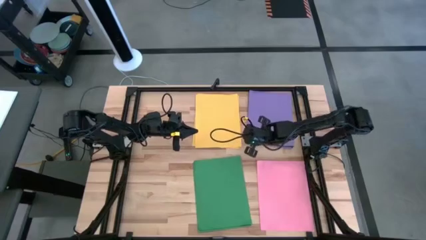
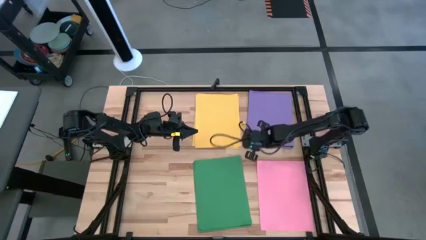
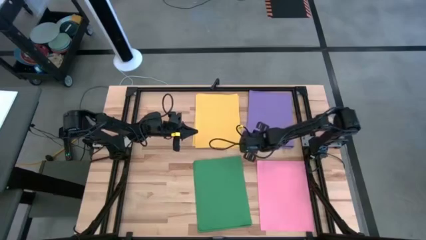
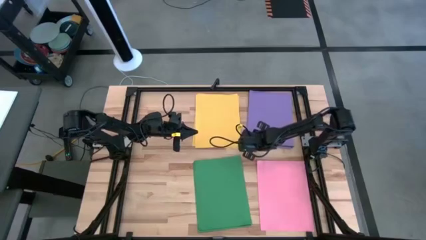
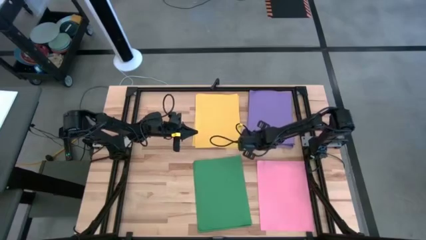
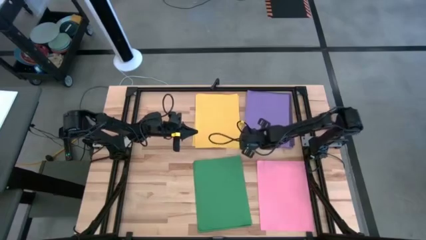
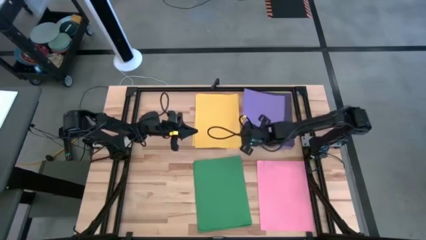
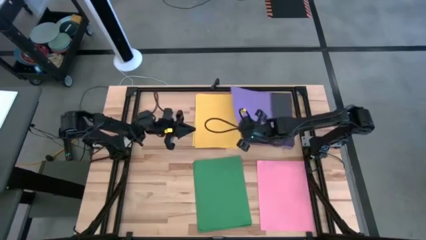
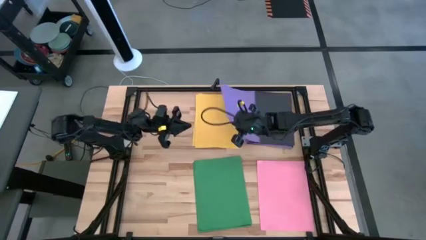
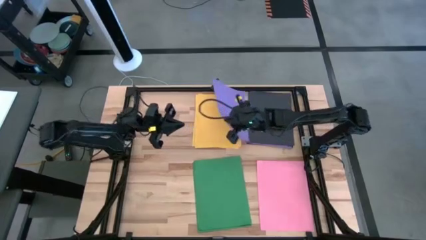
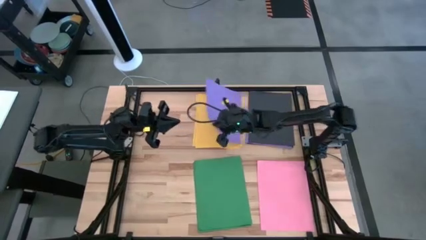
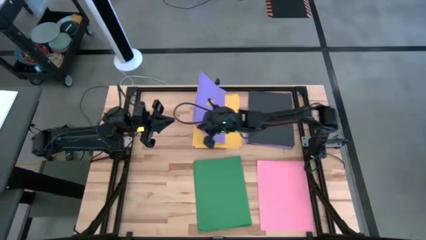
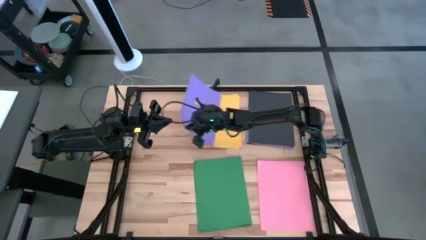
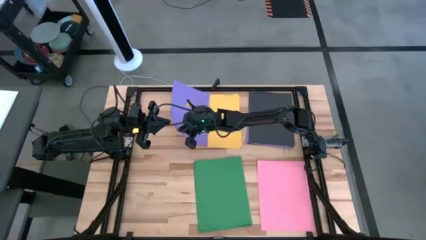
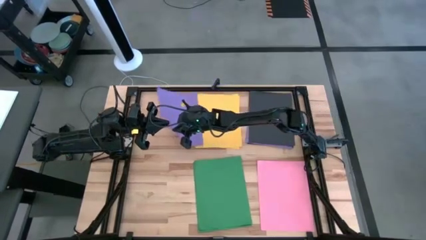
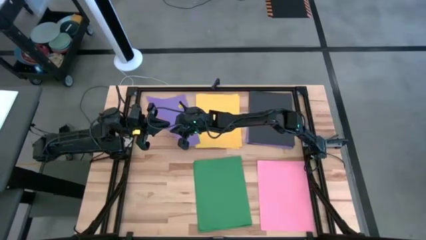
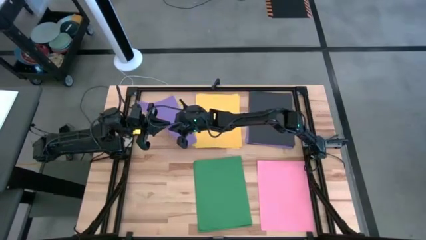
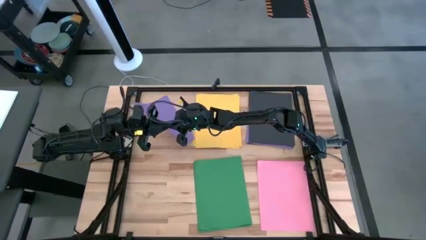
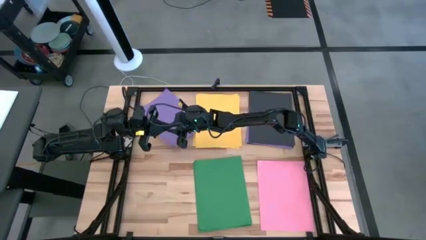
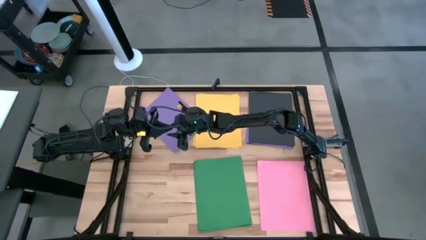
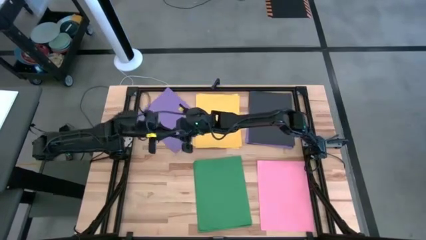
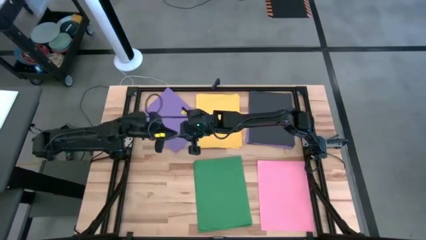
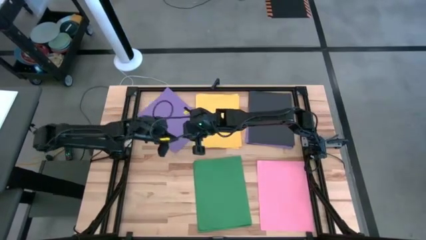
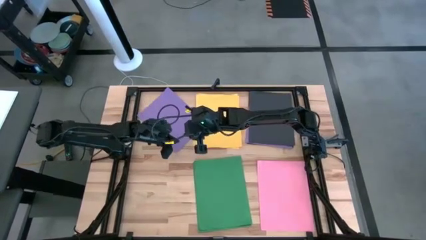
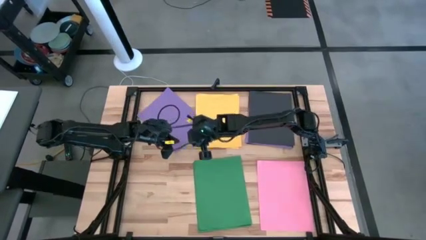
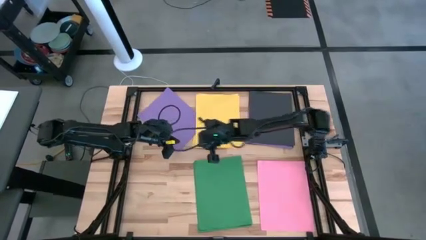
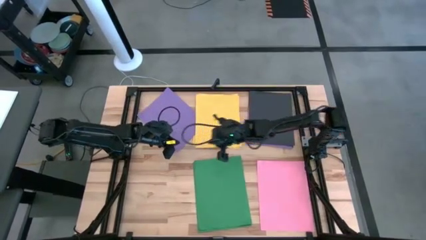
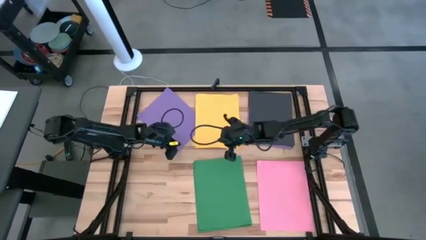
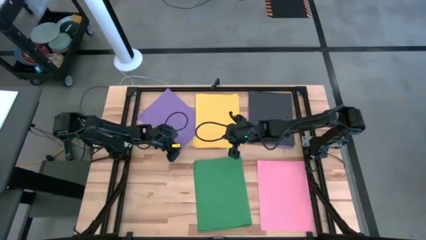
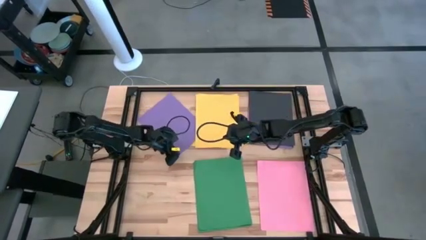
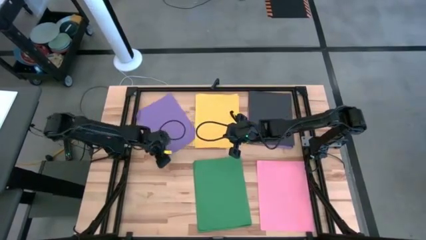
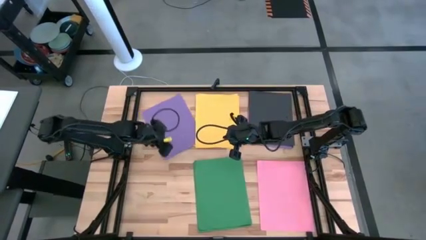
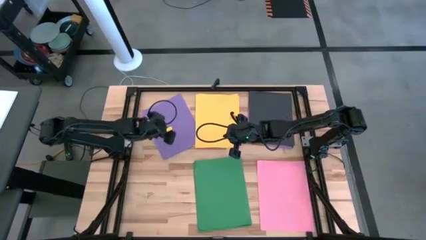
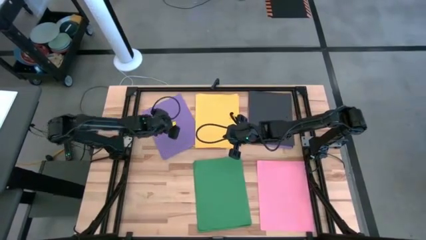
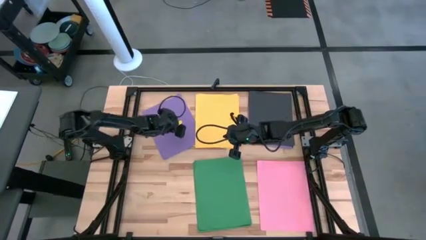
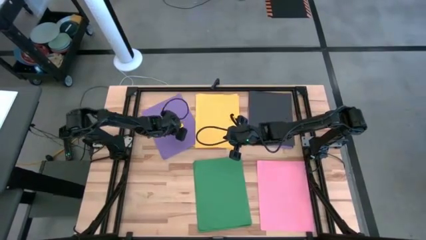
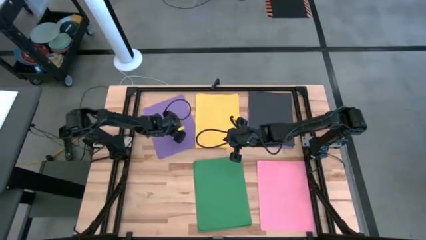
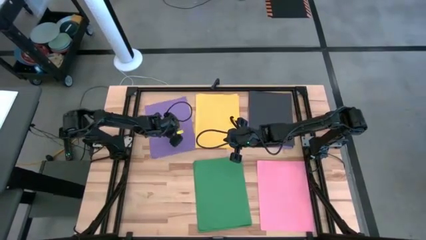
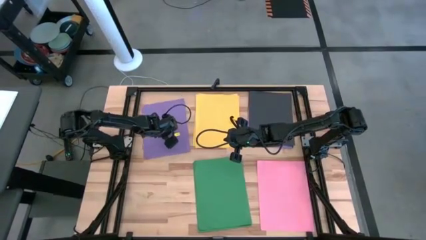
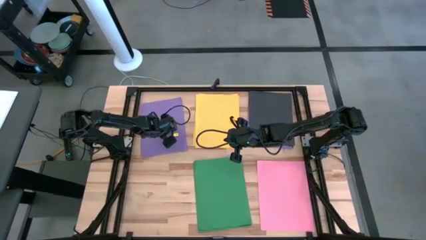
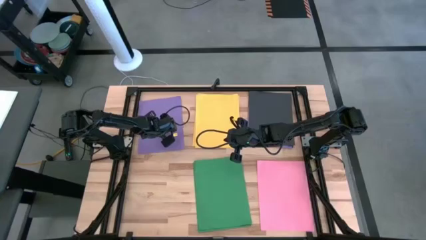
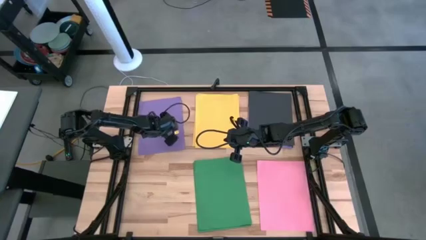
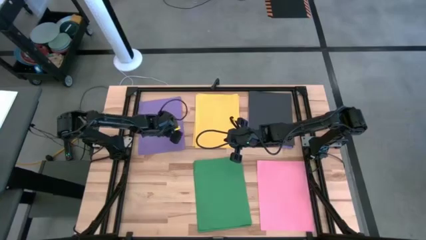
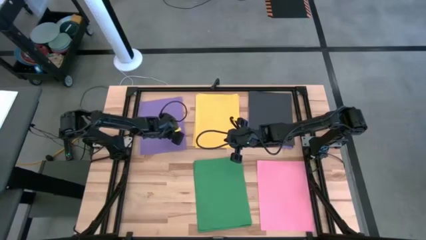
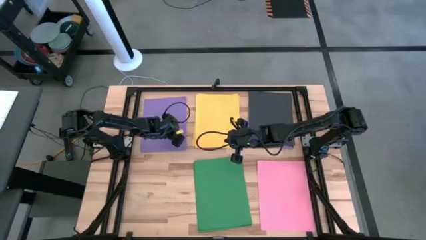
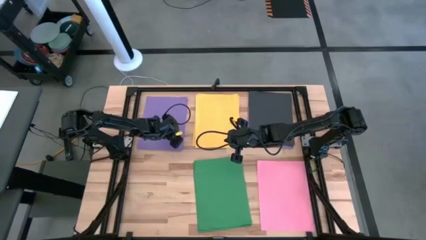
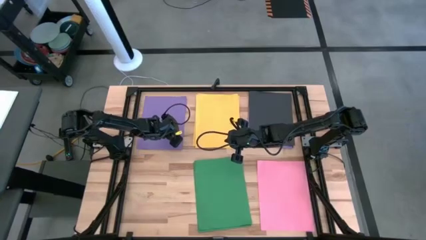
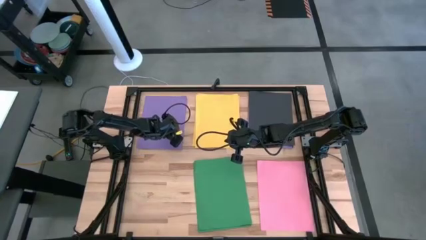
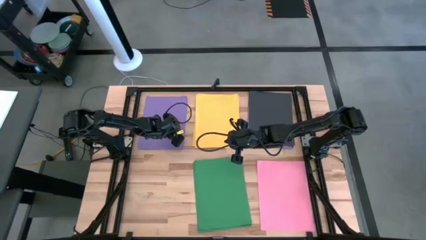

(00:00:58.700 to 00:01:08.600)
Task: Organize paper
Move the purple paper to the top left of the table

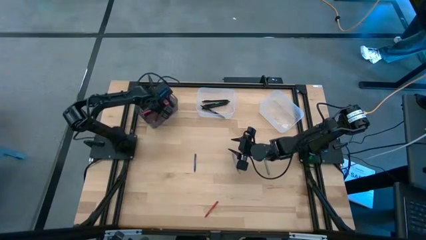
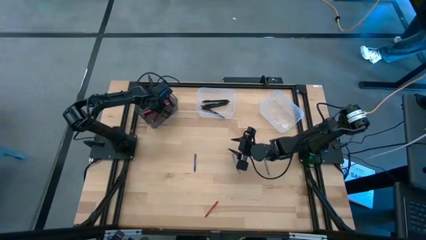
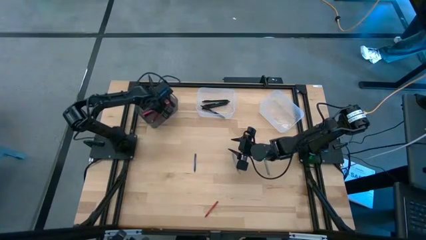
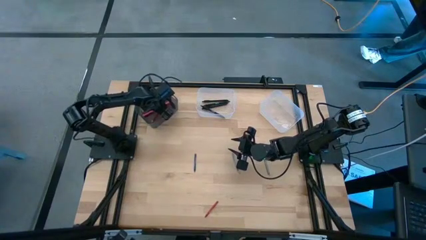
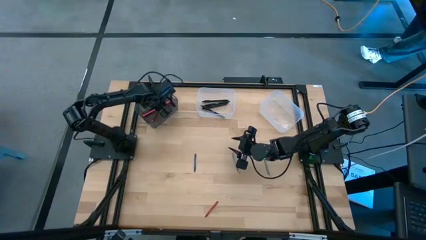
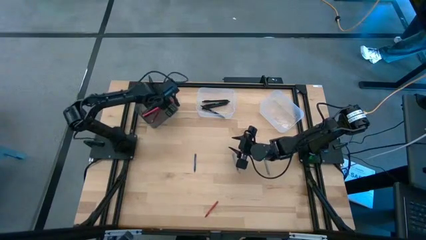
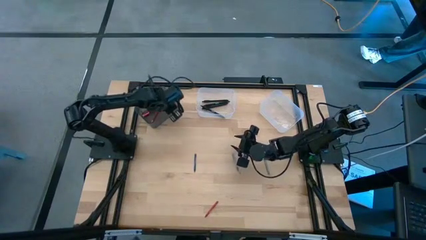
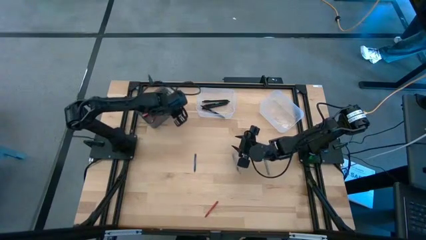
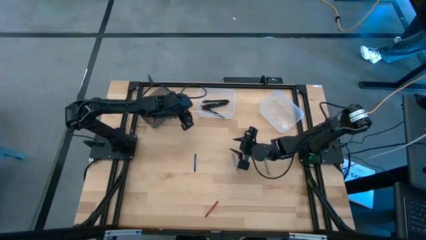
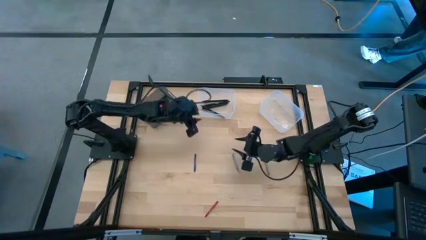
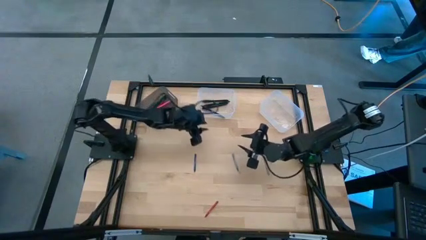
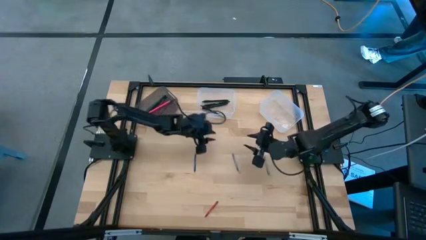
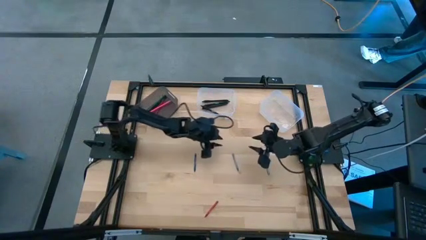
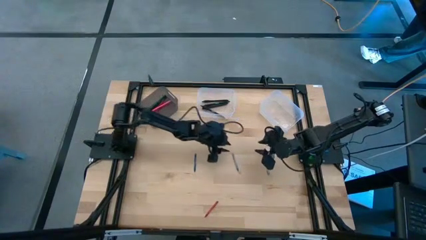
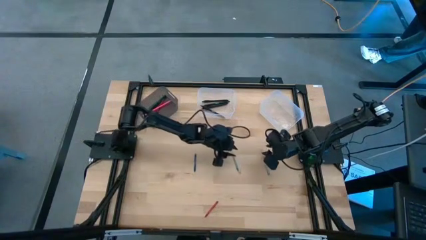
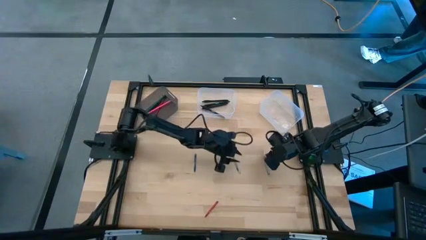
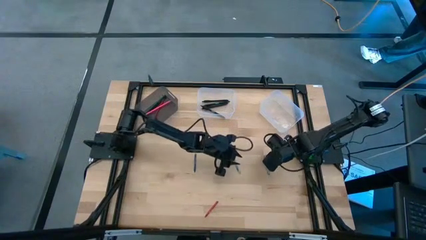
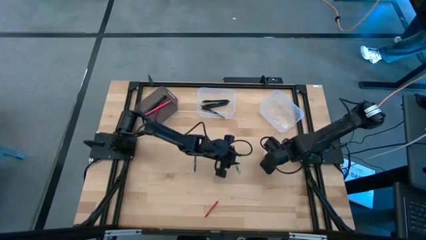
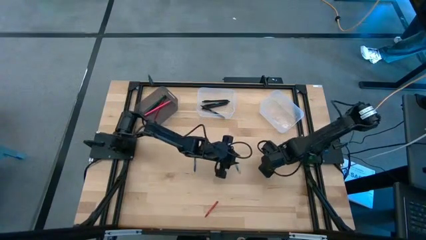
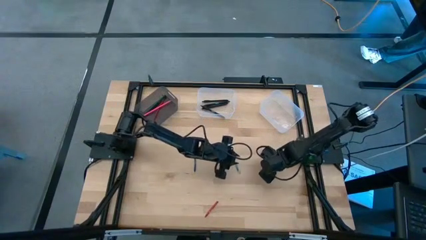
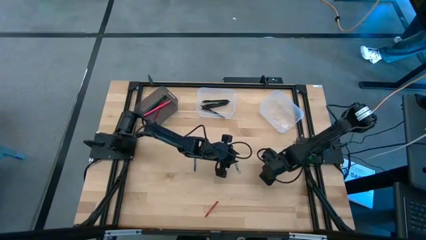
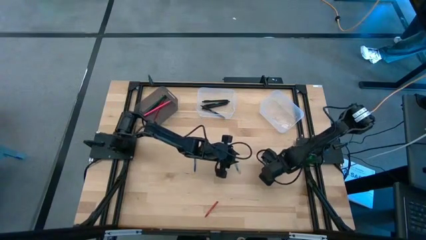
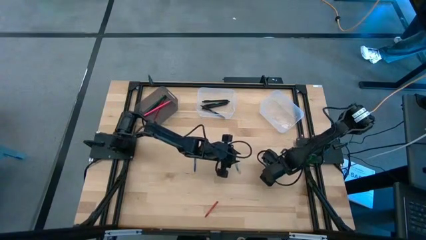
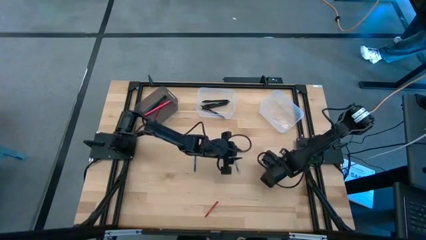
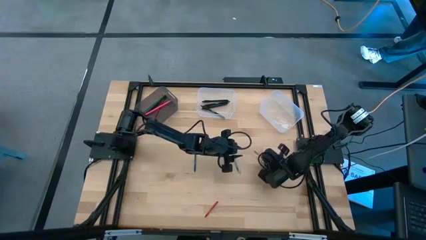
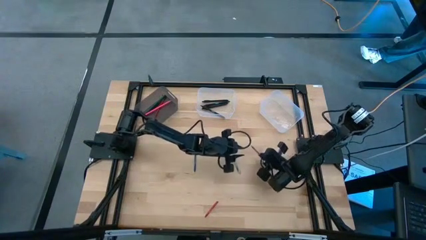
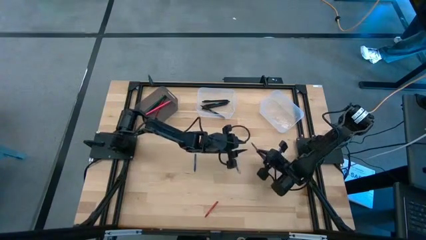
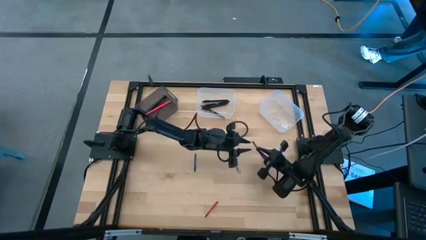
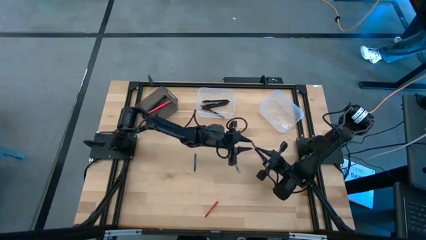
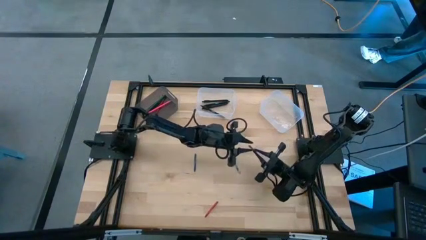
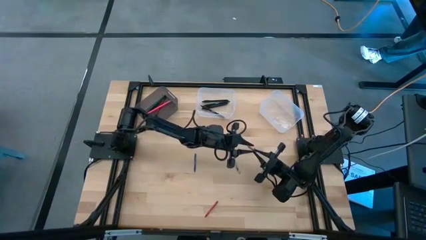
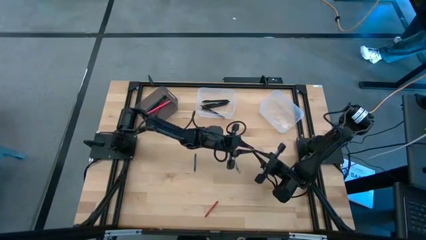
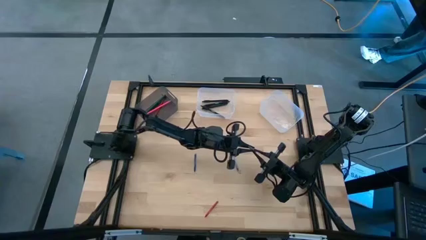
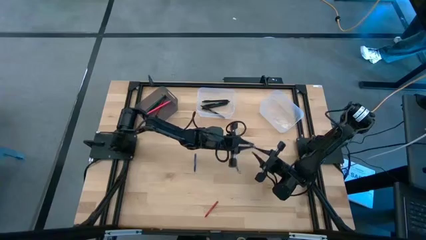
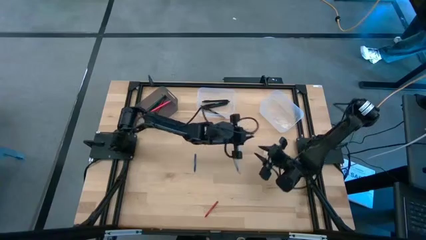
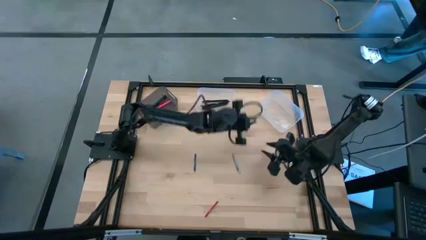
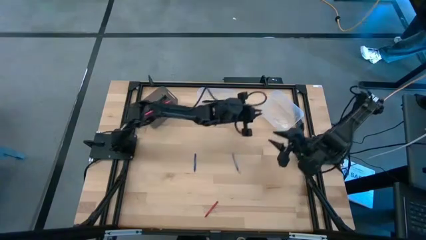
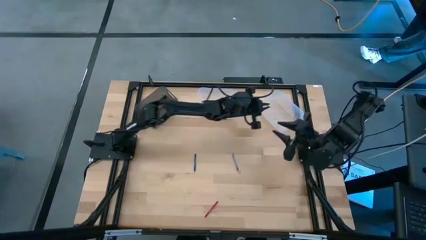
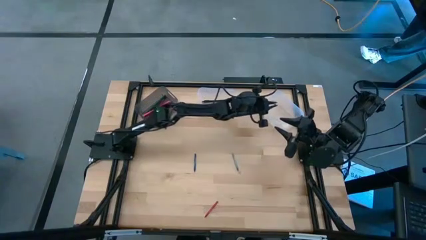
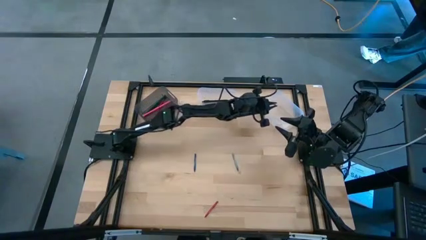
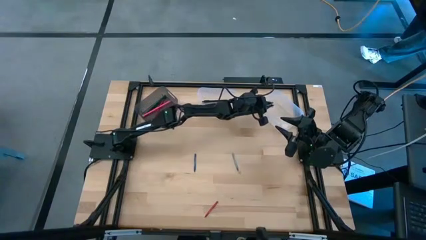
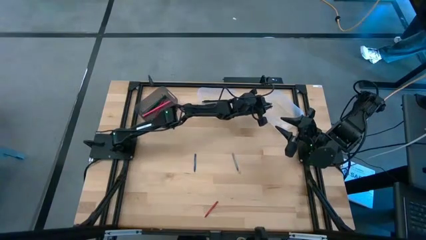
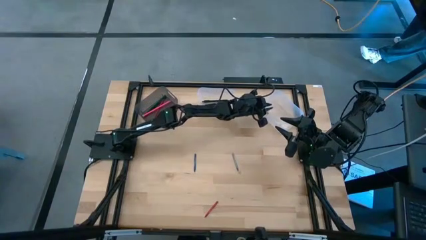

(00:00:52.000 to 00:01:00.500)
Task: Sort crayons/erasers/pens/pencils in bins
Put the gray crayon into the right transparent bin
